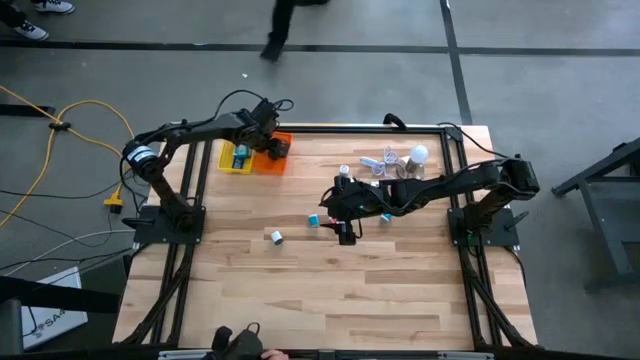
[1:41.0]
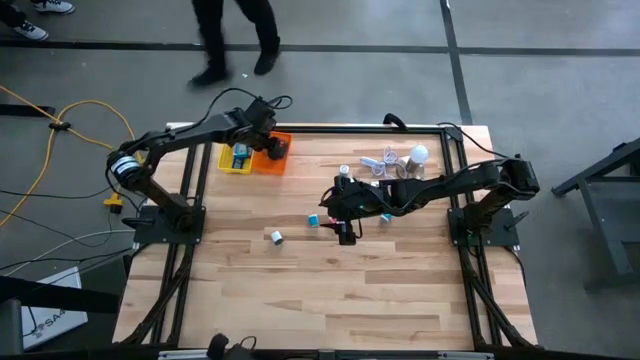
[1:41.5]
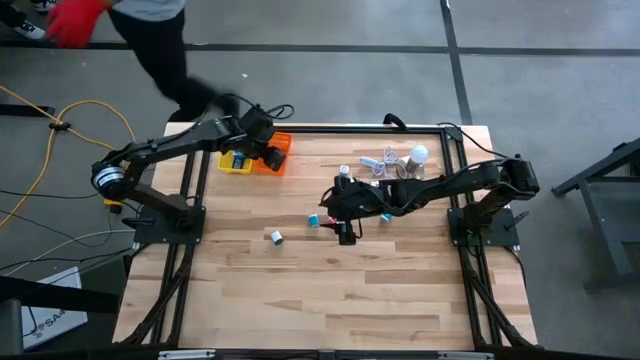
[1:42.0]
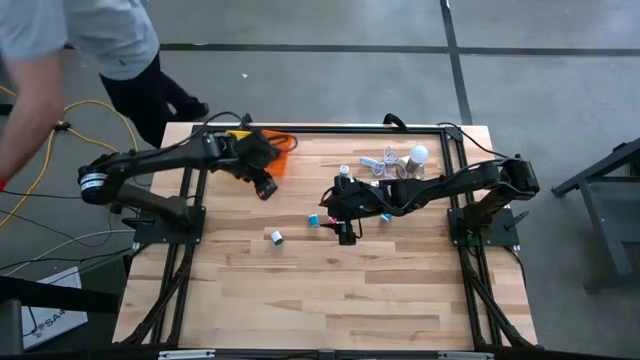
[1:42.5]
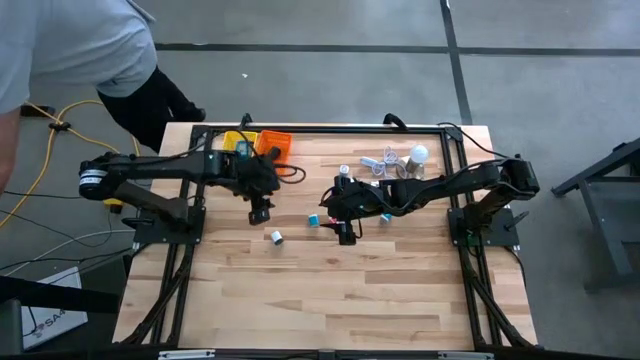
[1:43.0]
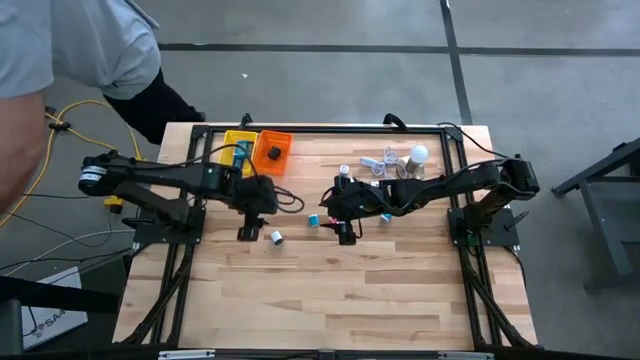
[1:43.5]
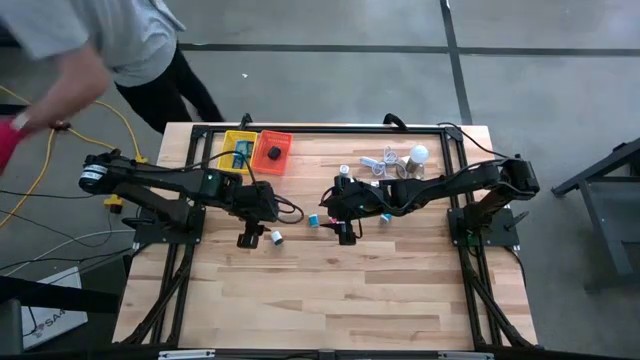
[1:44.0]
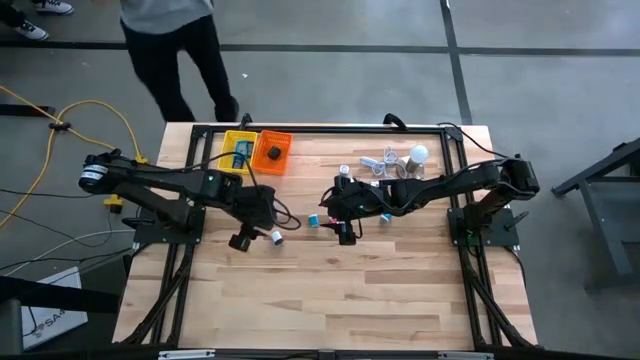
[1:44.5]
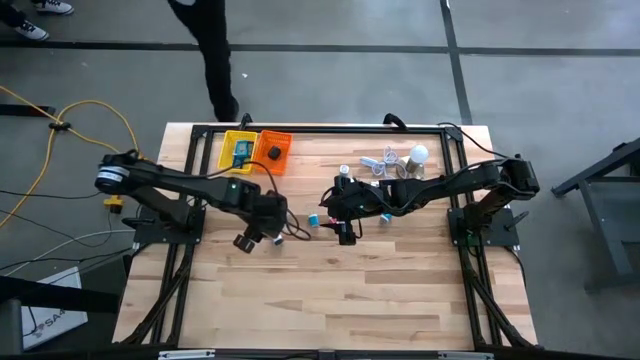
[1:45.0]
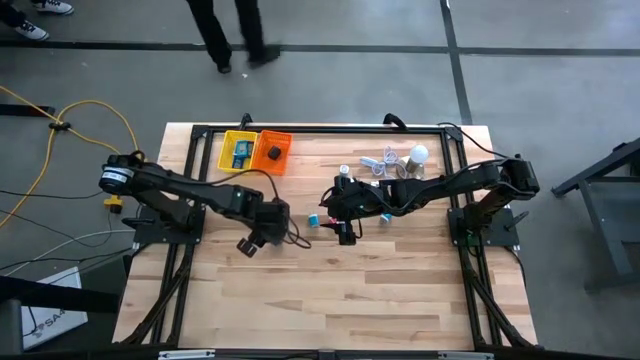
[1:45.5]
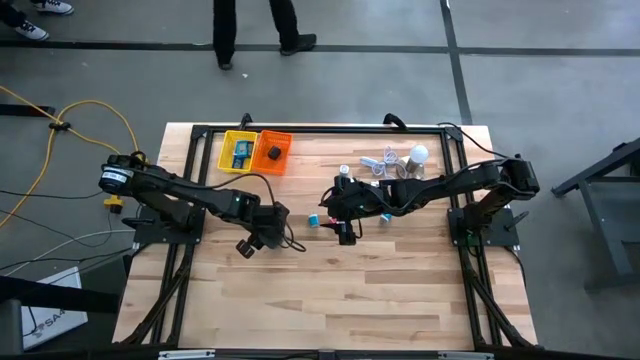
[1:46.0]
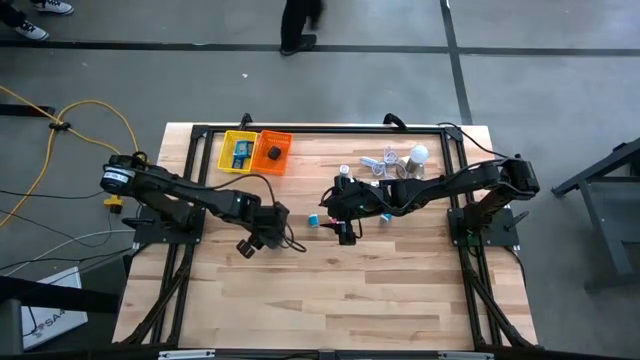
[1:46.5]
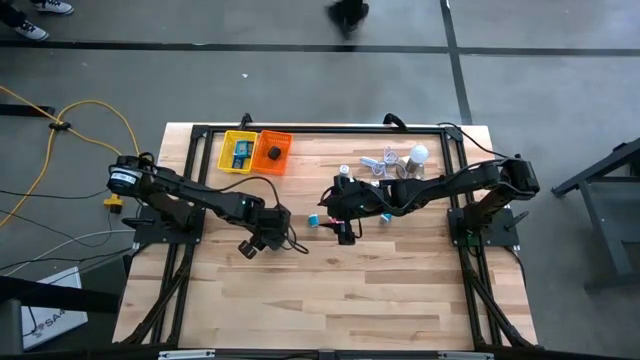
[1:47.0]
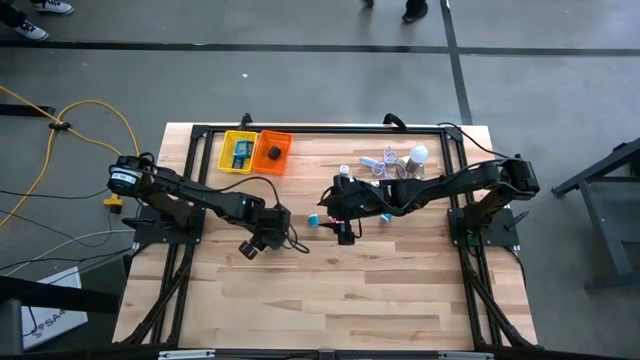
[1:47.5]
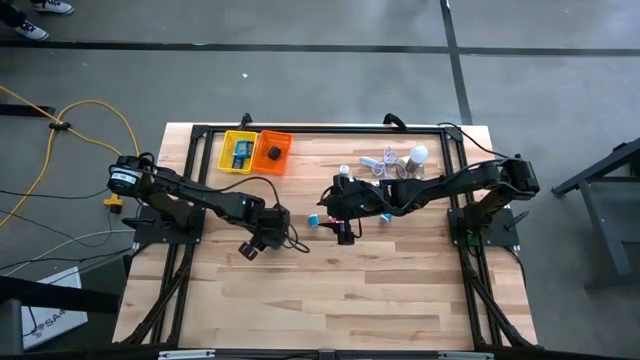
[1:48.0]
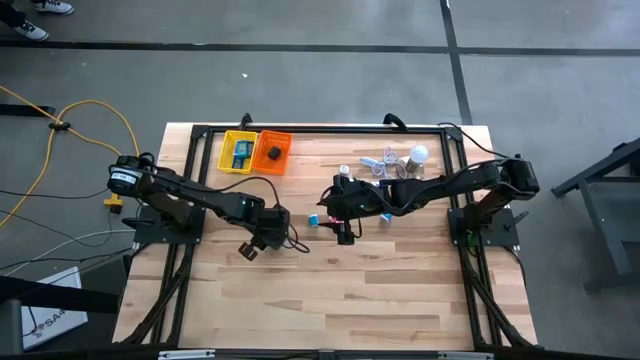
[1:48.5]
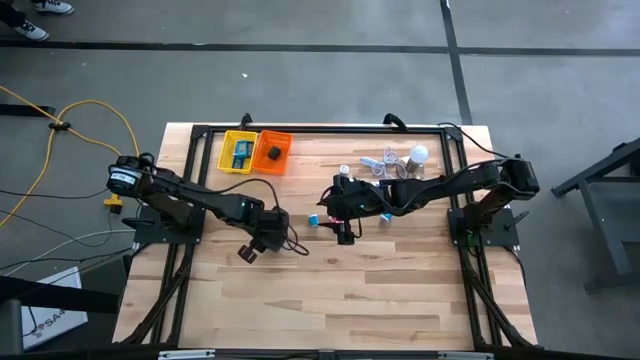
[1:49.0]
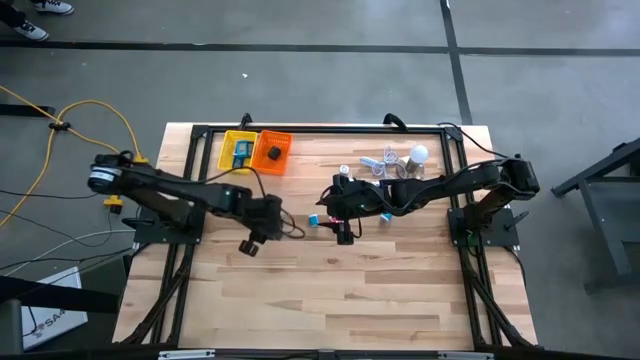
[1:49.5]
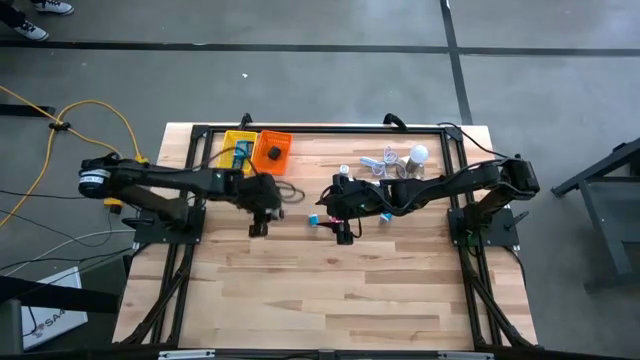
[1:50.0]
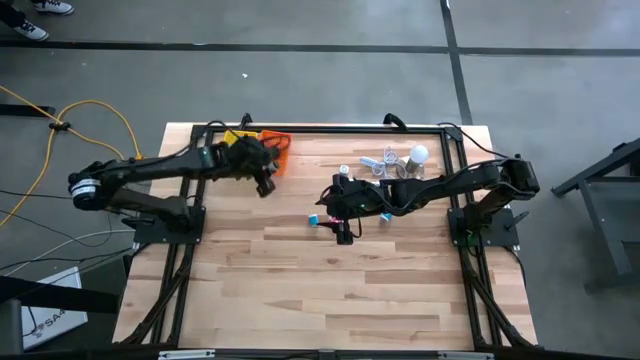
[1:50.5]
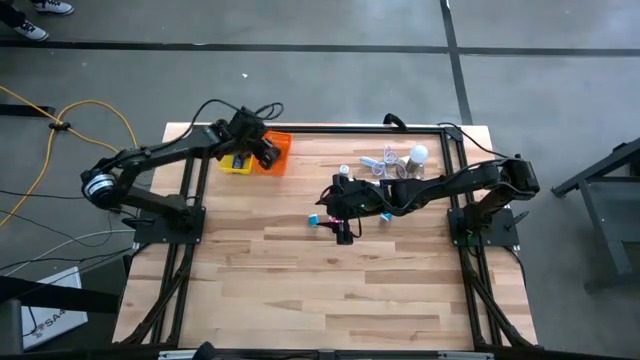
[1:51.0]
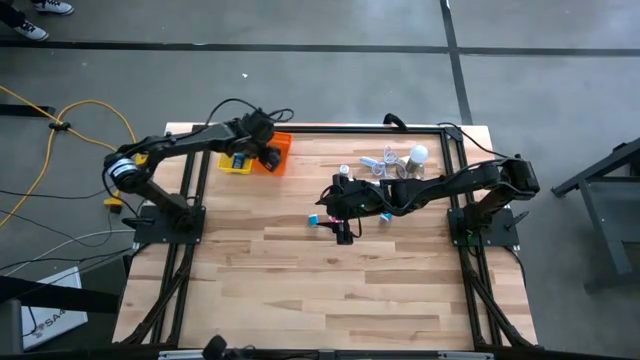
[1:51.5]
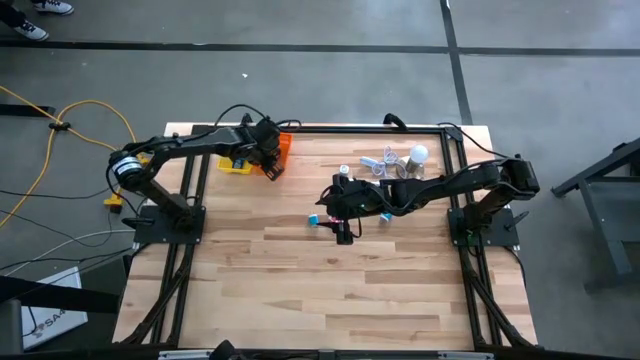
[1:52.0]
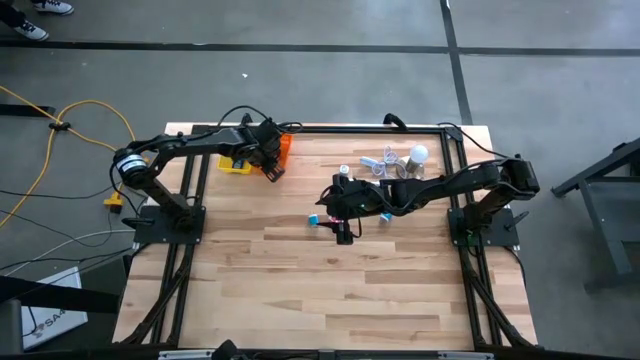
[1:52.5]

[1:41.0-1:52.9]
Task: Pick & Place Office items
Put the white adapter into the orange basket

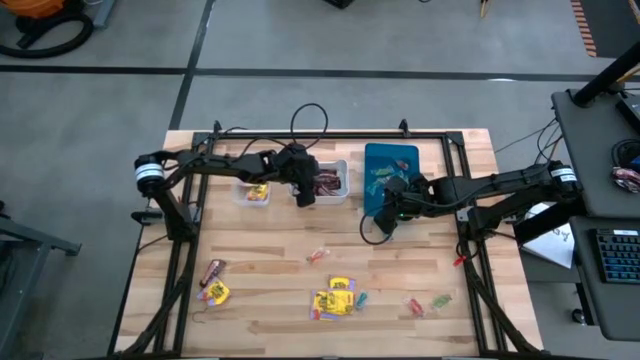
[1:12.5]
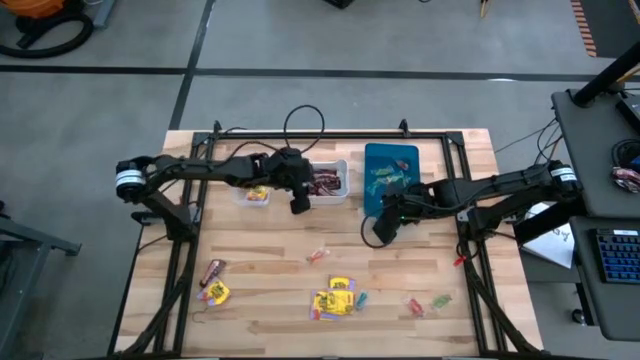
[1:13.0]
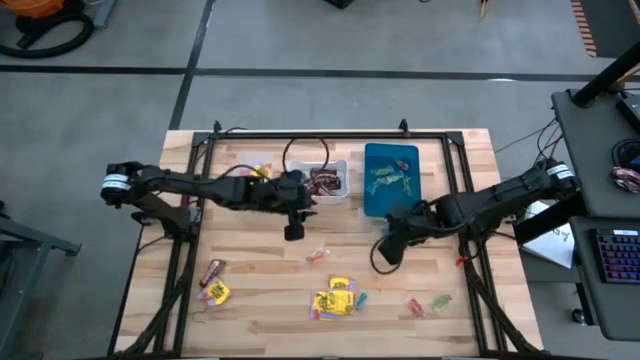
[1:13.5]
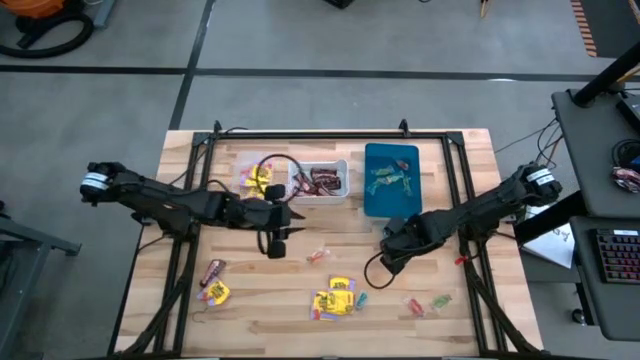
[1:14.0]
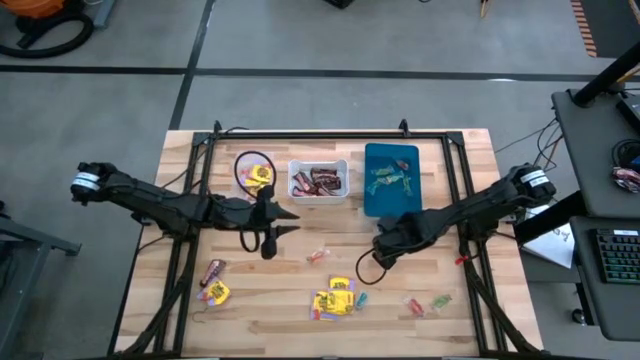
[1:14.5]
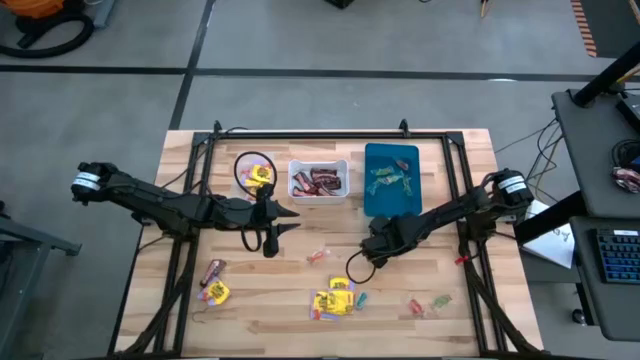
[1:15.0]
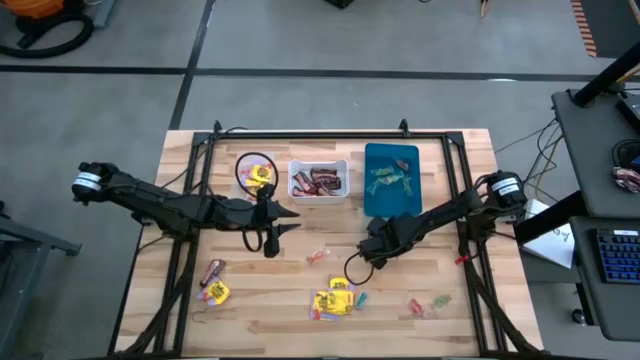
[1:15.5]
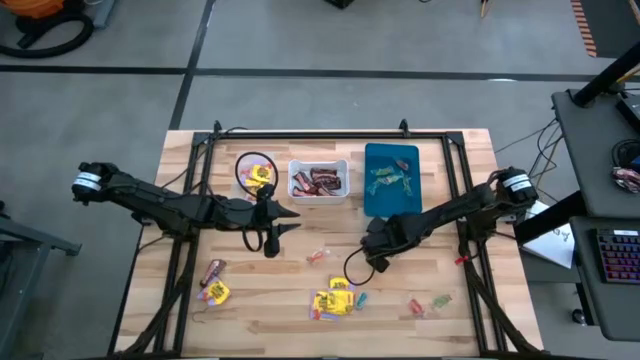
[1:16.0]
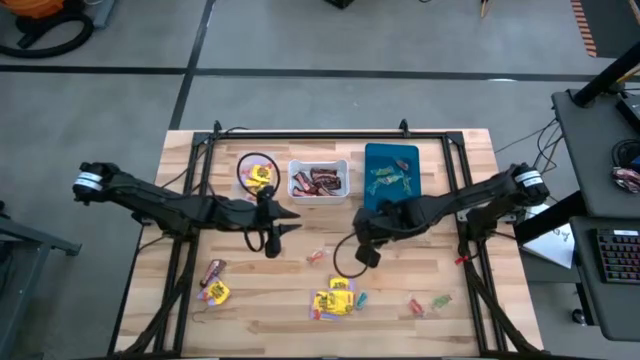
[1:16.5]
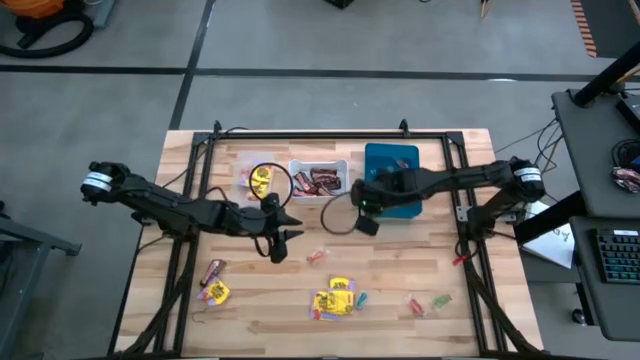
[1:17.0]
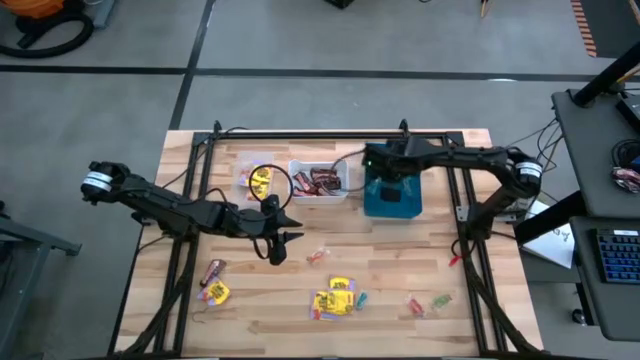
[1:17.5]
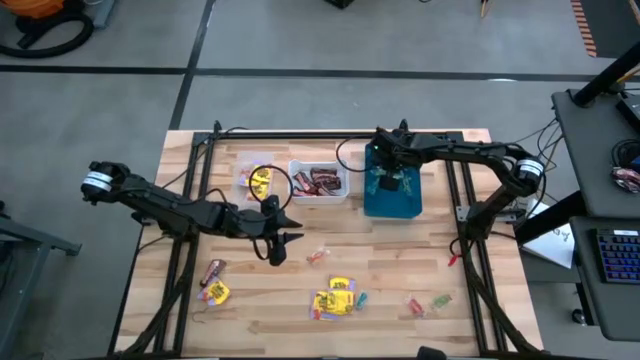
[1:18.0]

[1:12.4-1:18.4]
Task: Sort candy
Put the blue candy into the blue bin

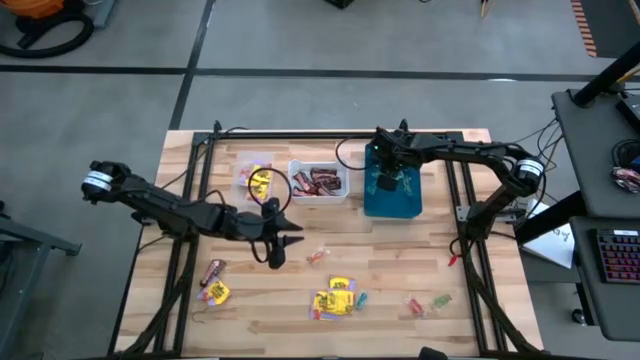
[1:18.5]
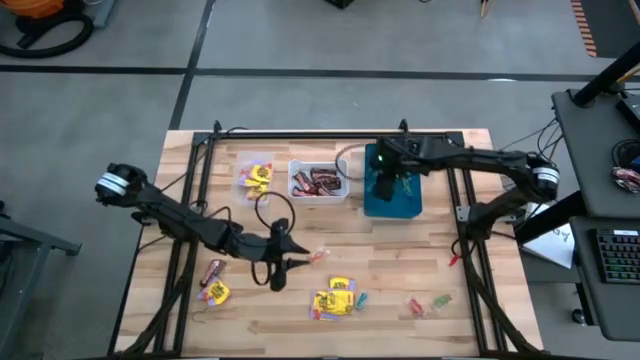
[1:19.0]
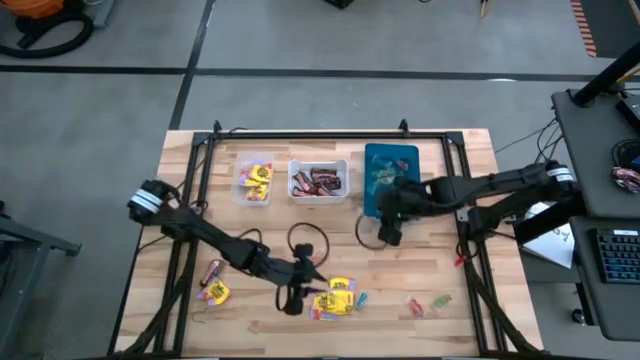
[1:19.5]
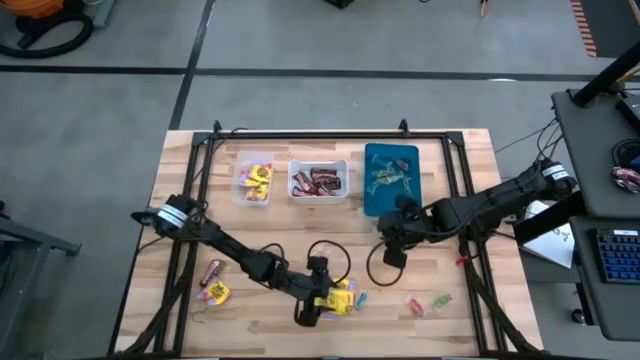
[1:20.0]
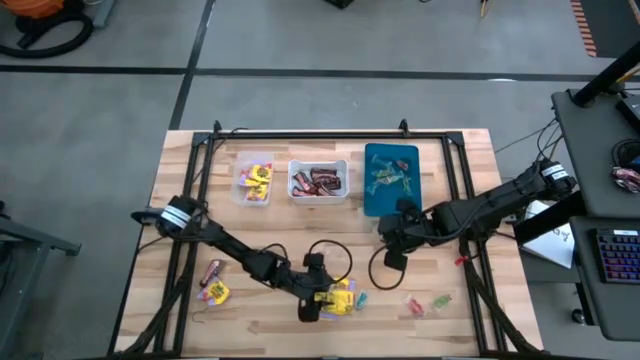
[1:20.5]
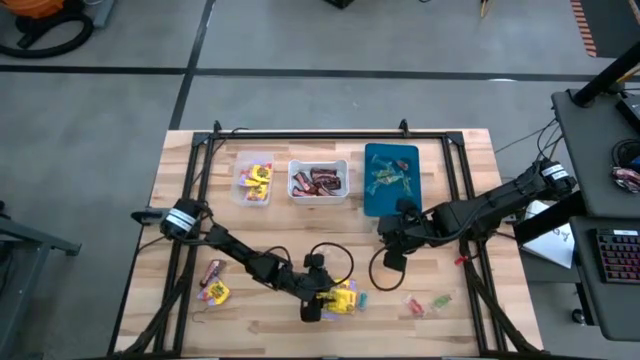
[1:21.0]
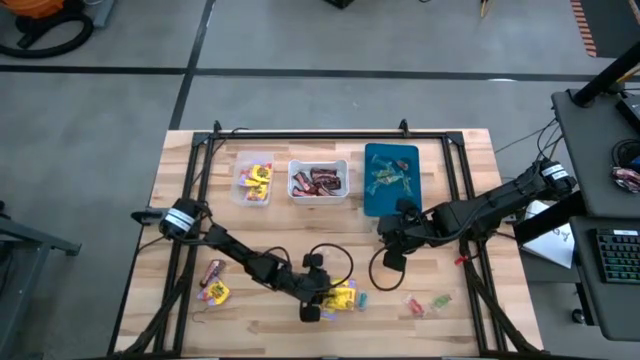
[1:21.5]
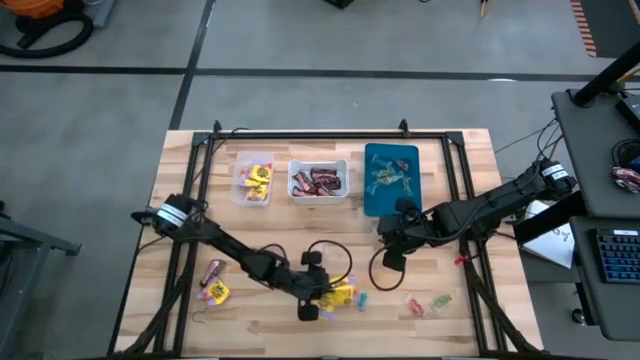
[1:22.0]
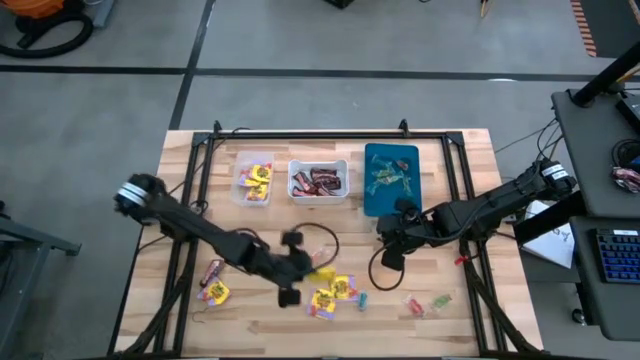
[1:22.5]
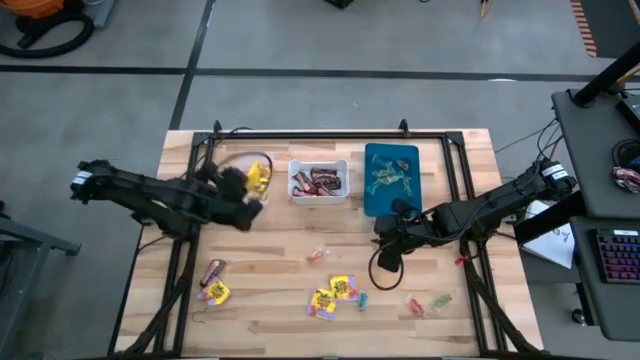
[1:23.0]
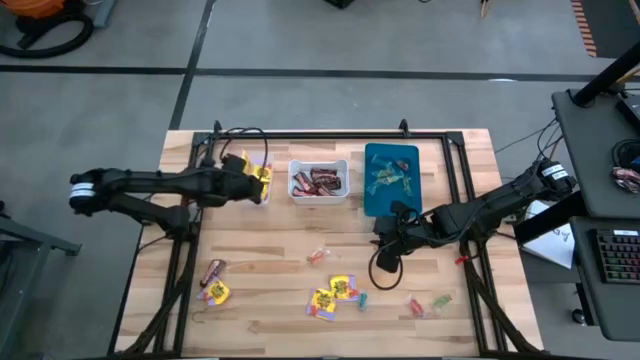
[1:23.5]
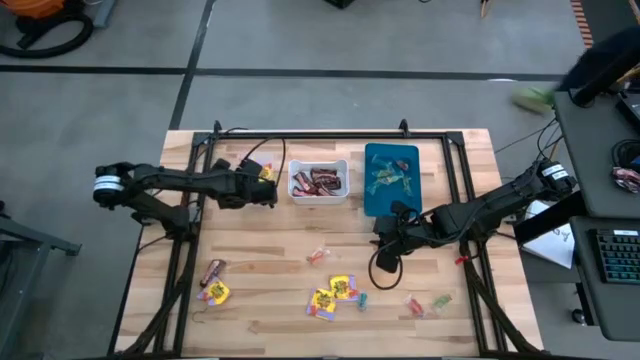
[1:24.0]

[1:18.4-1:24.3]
Put the yellow candy into the transparent bin
